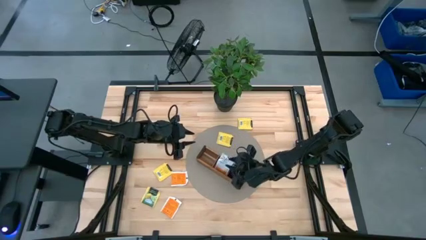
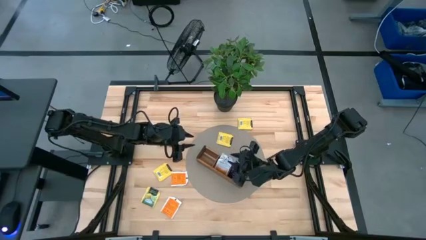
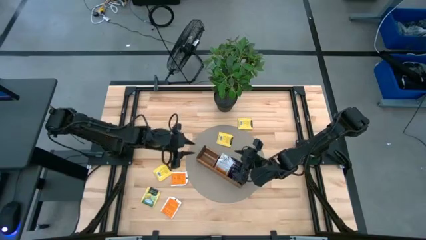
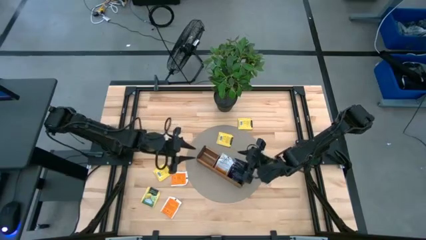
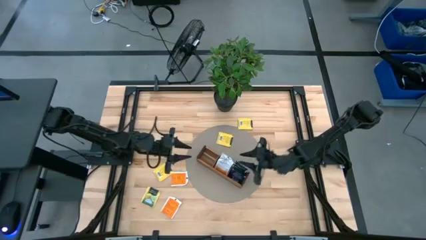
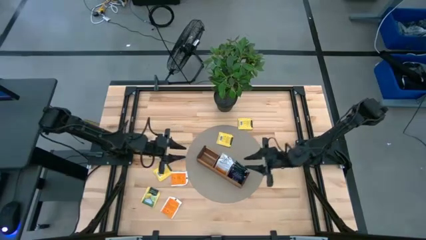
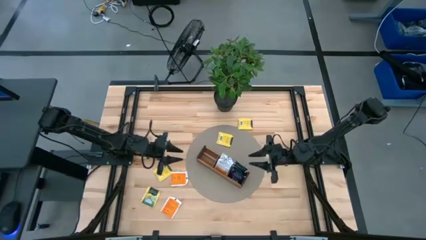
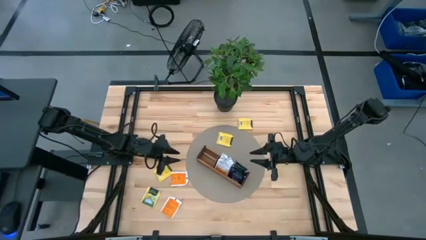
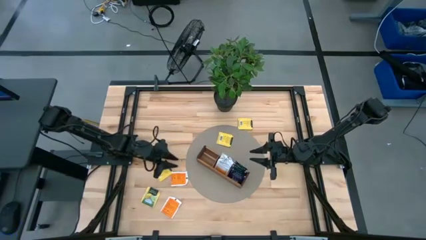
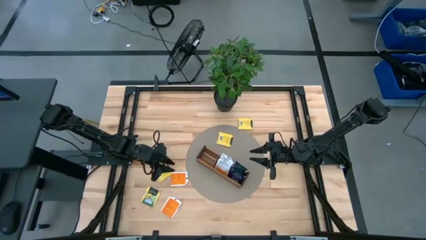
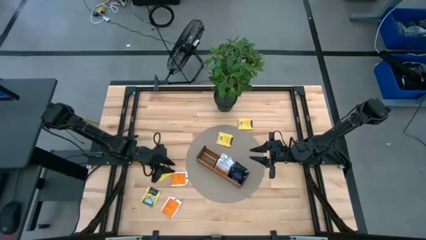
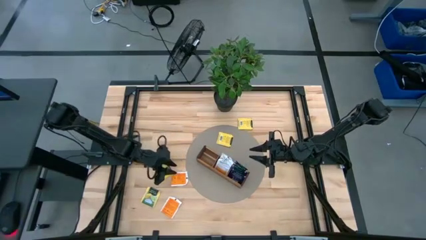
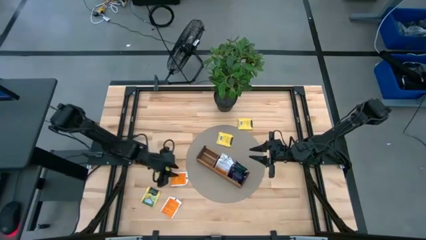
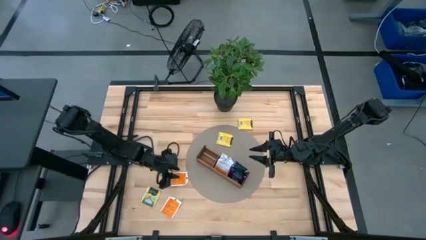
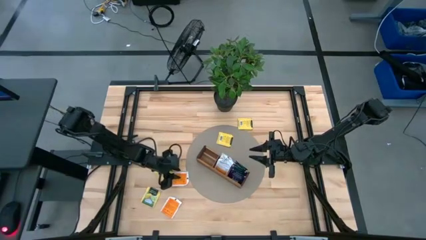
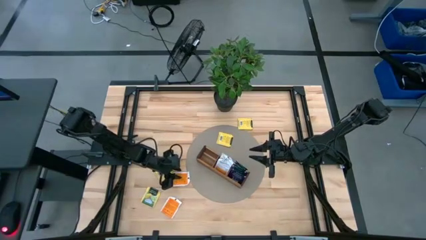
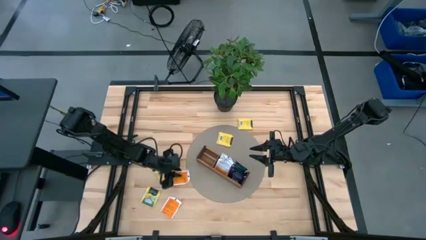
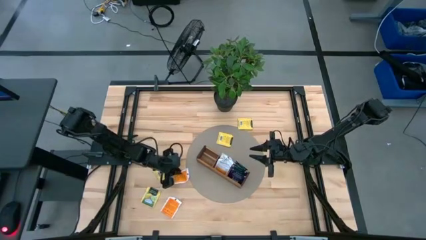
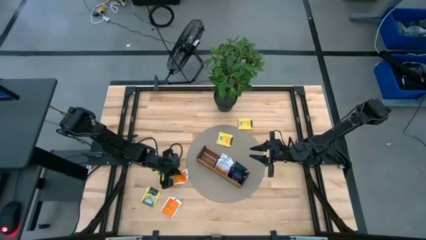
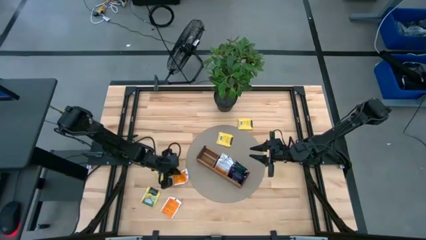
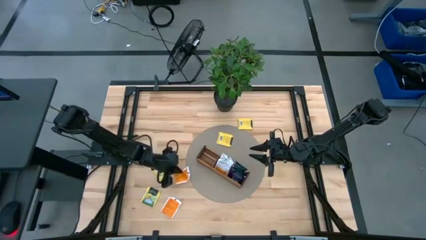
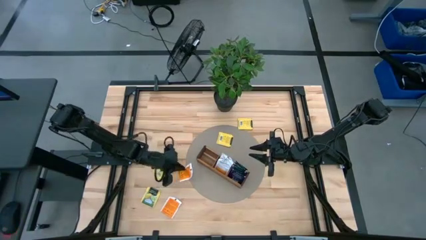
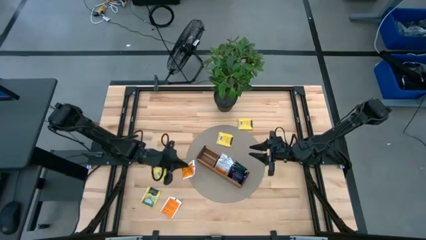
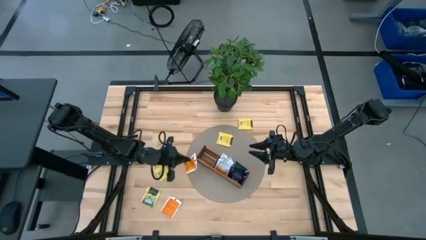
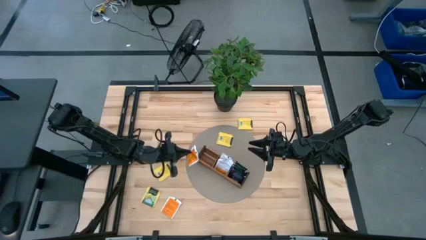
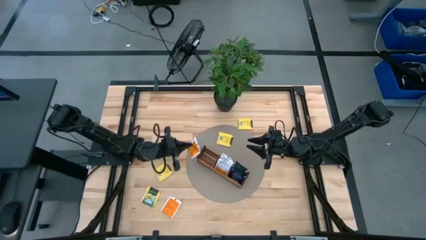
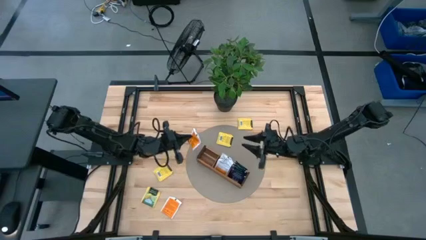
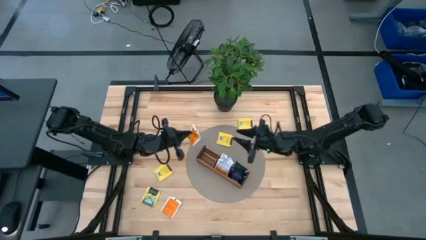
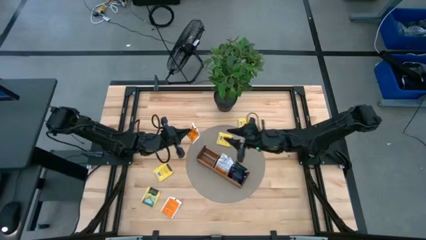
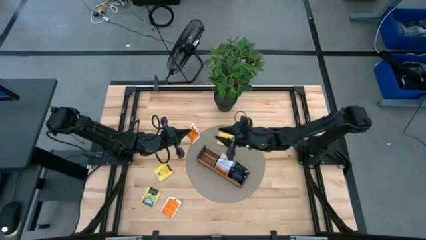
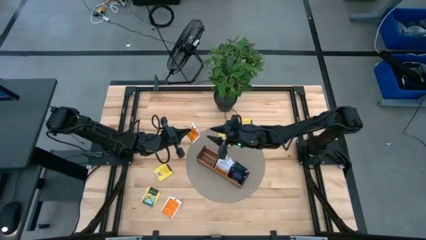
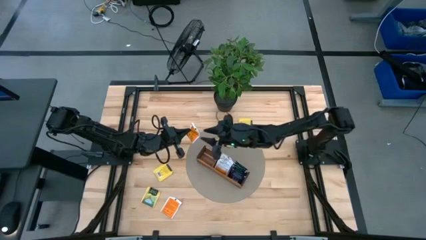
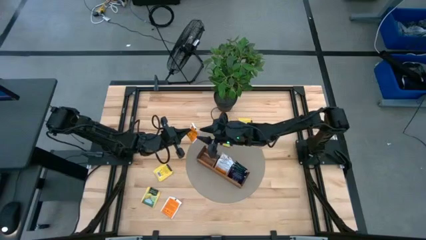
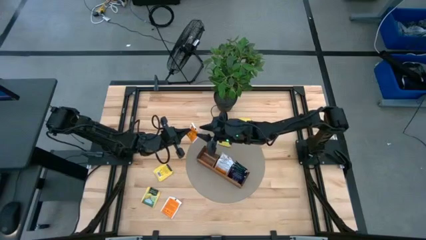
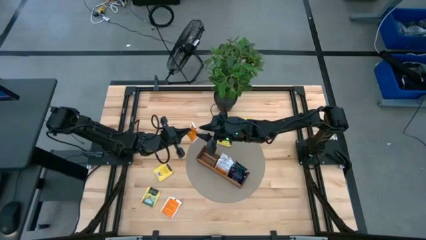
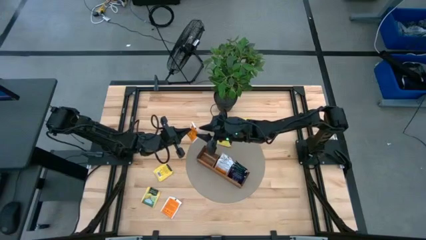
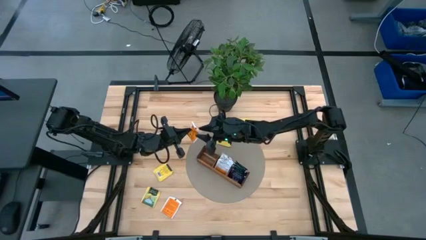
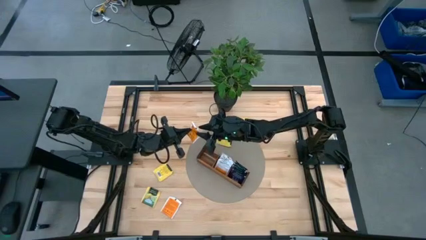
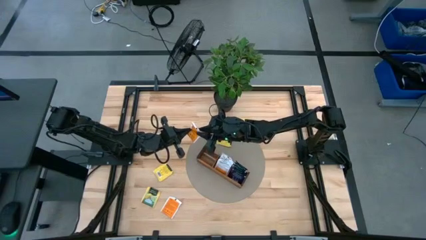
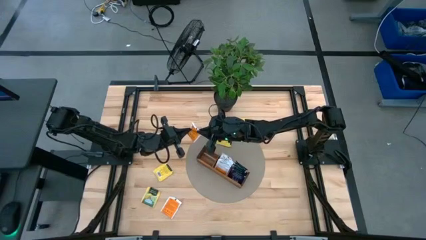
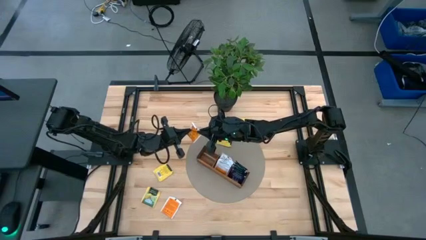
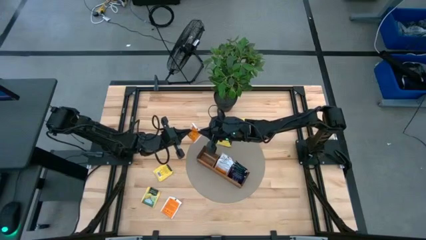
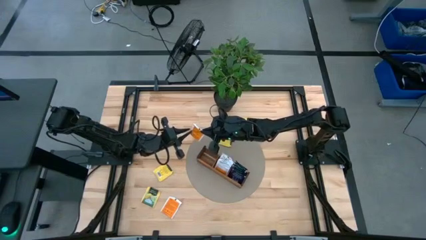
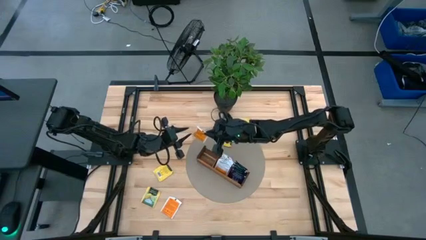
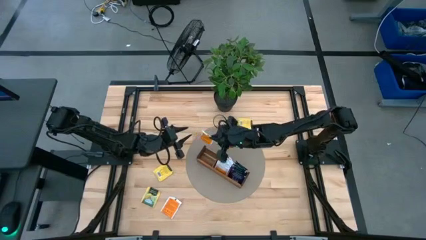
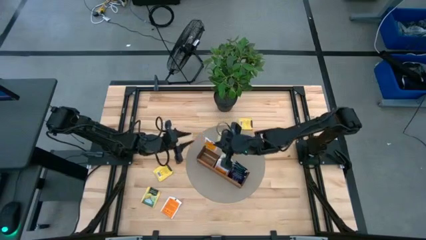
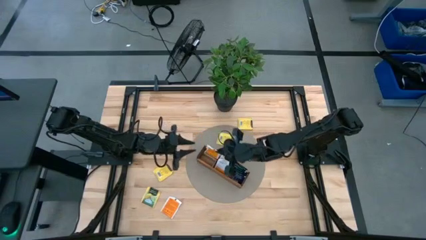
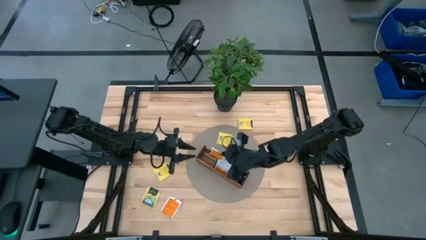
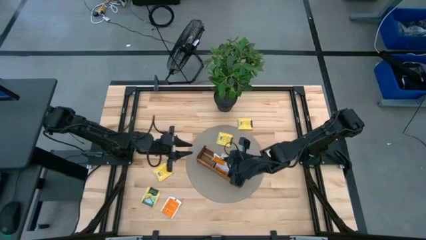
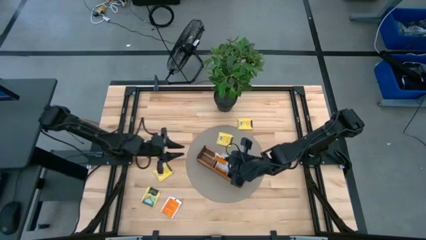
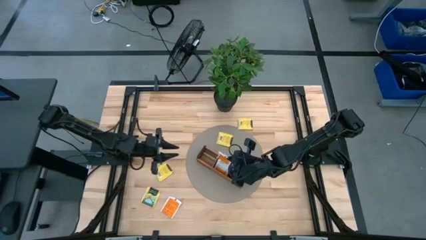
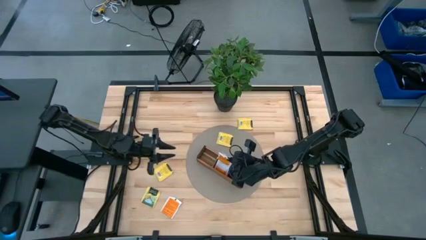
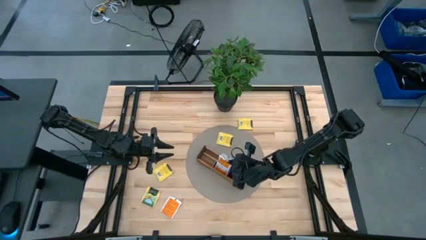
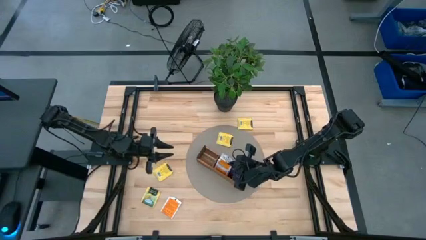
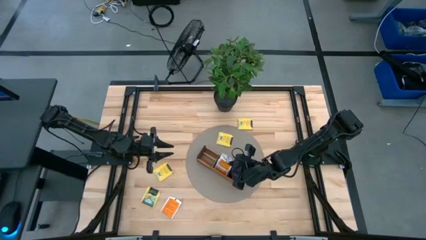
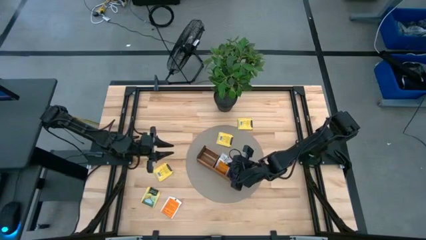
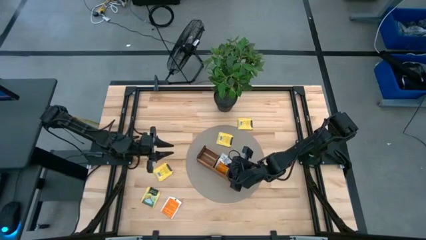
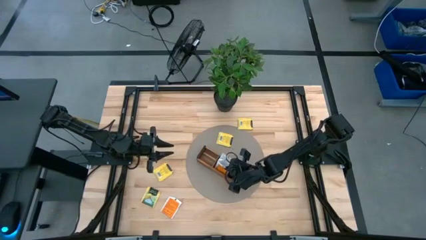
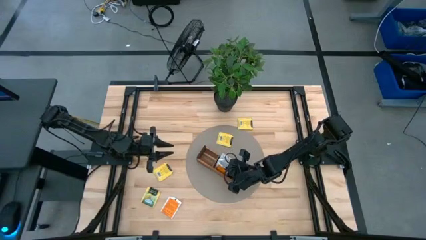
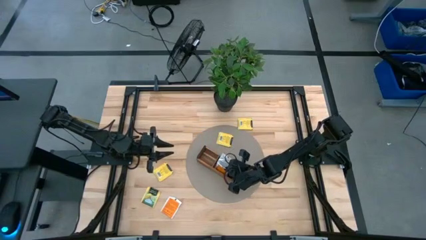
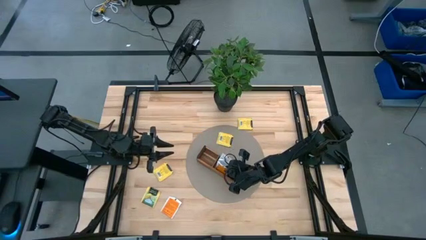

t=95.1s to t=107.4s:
Task: Pick & Place Tea
Put the orange tea bag into the middle section of the wooden organizer

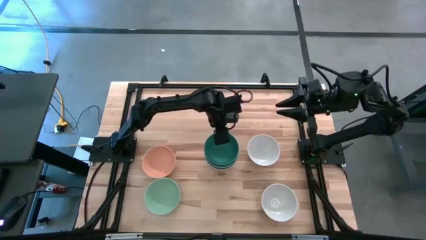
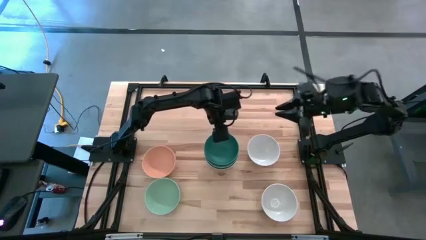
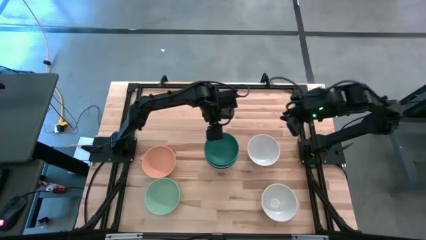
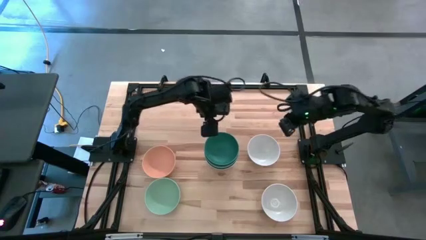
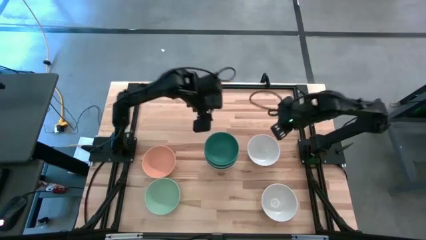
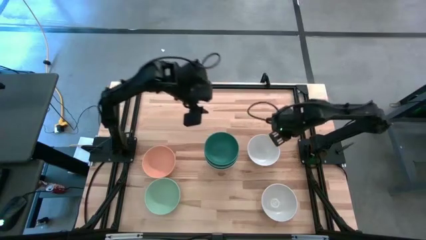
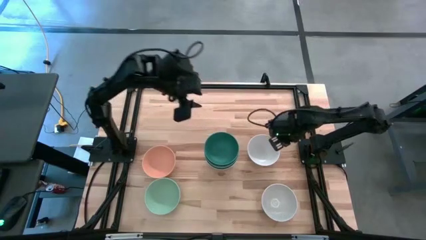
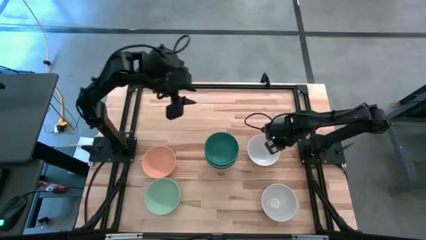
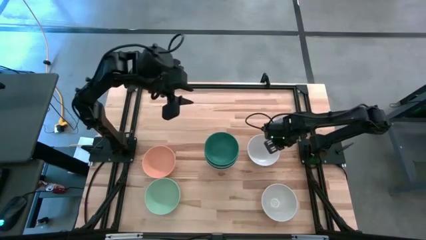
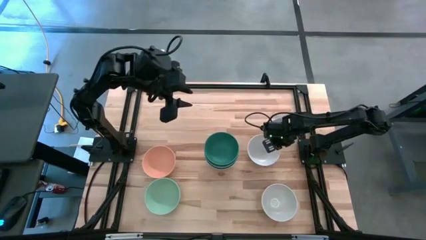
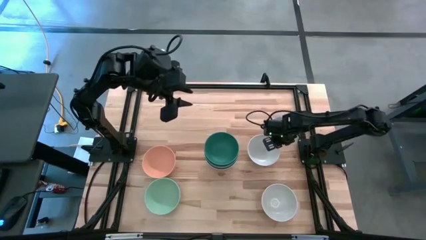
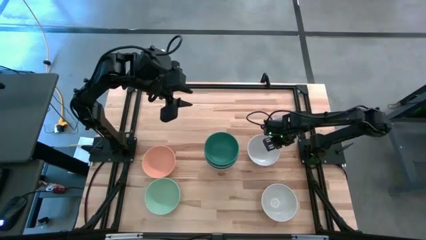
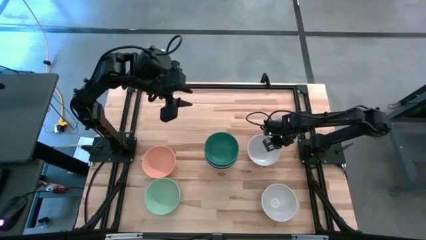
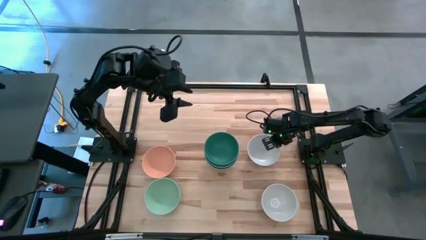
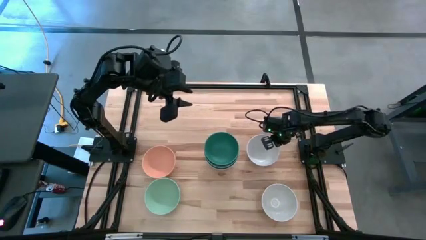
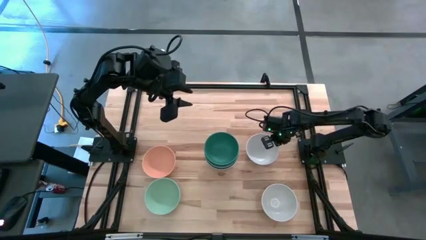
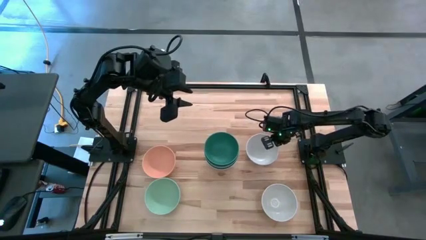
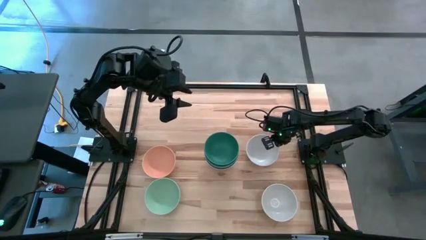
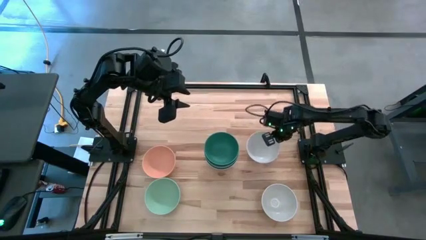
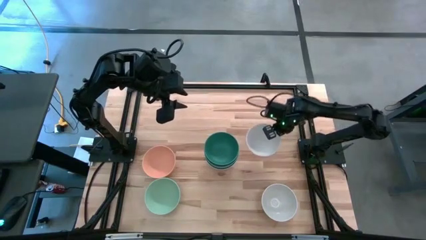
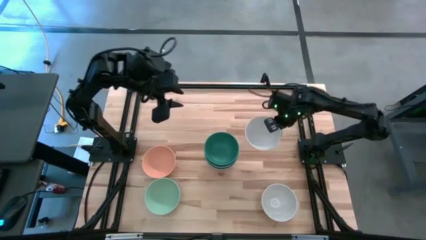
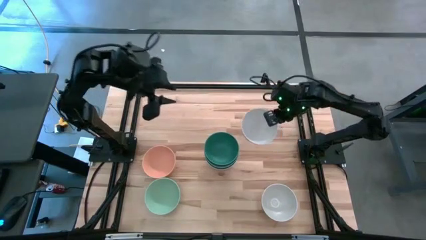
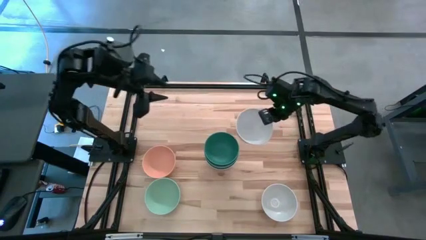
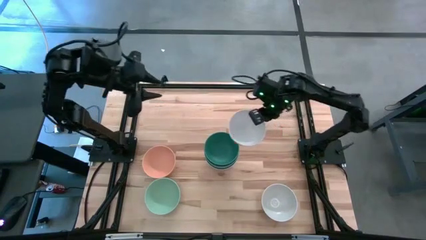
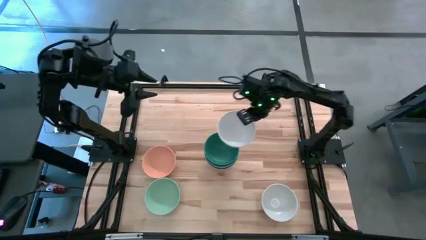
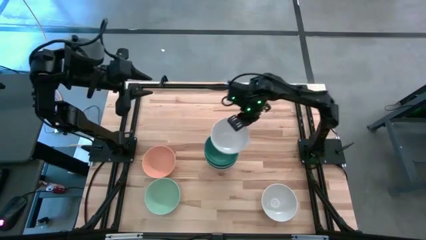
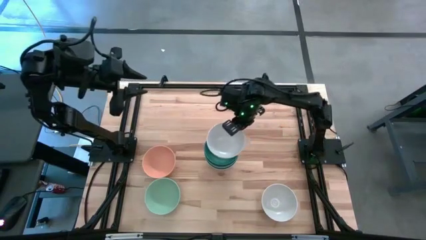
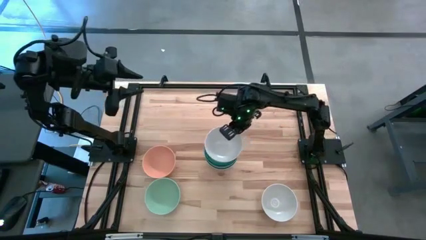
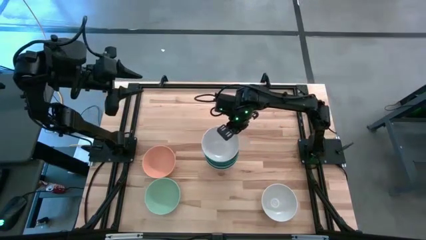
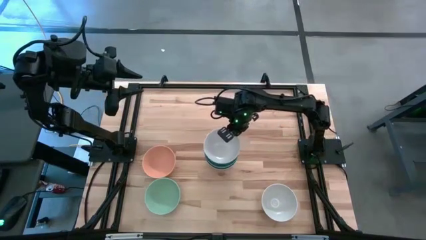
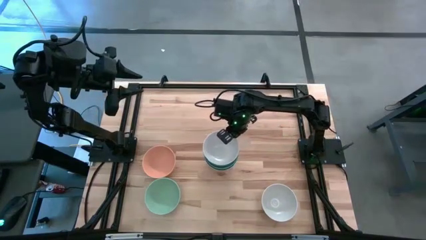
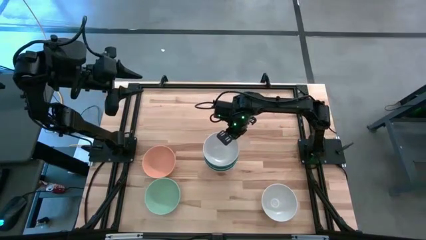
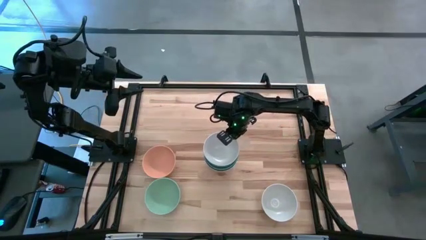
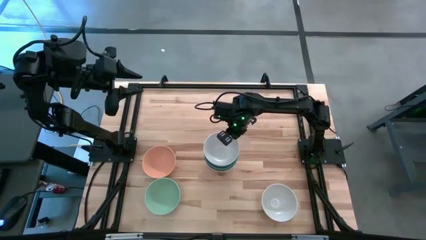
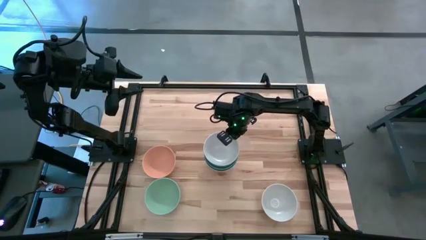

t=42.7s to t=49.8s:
Task: Nest bowls inside each other
Stack the top white bowl on top of the dark blue bowl
